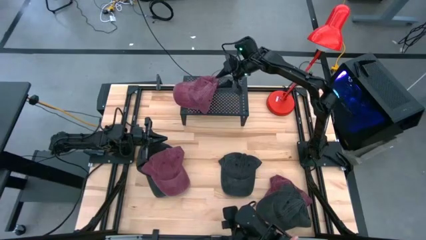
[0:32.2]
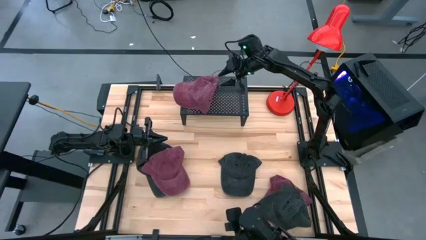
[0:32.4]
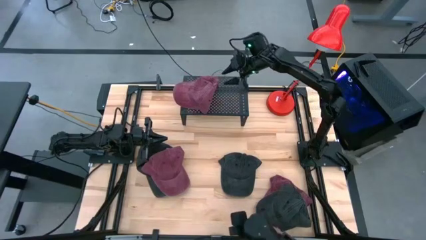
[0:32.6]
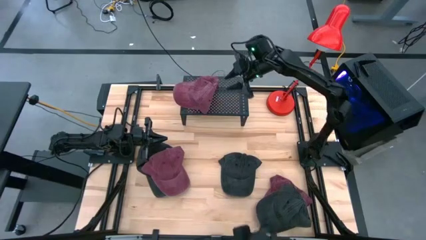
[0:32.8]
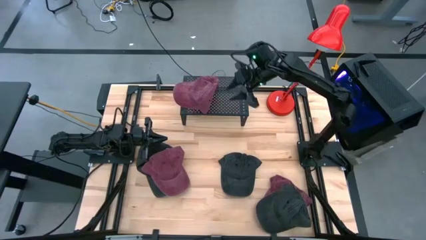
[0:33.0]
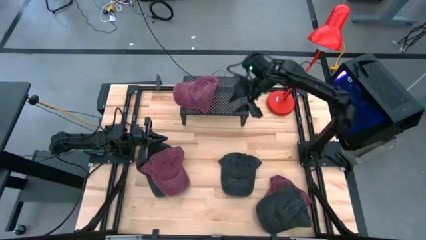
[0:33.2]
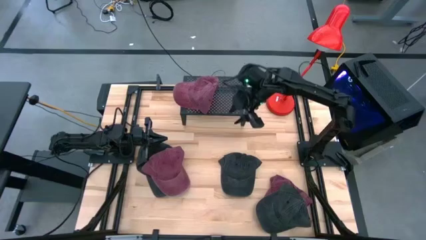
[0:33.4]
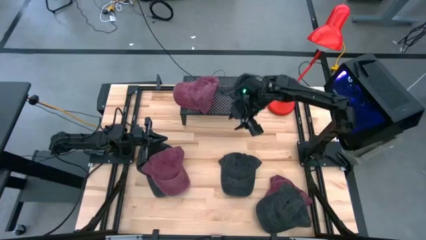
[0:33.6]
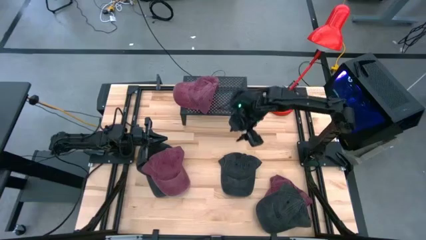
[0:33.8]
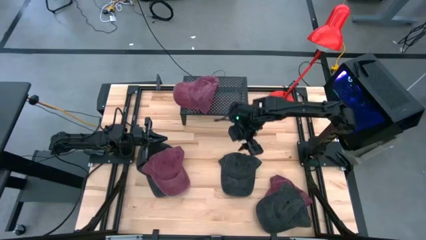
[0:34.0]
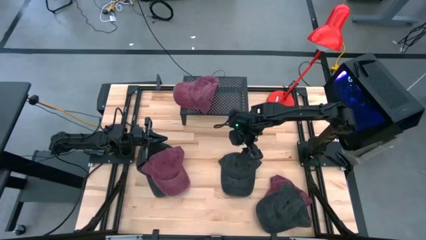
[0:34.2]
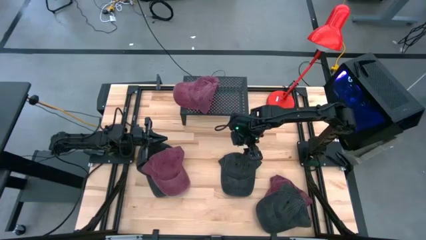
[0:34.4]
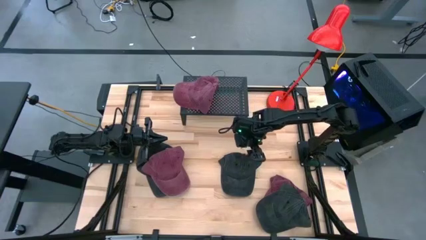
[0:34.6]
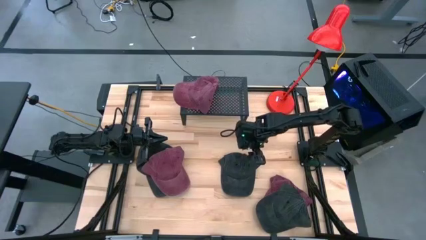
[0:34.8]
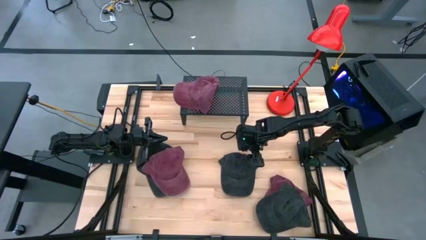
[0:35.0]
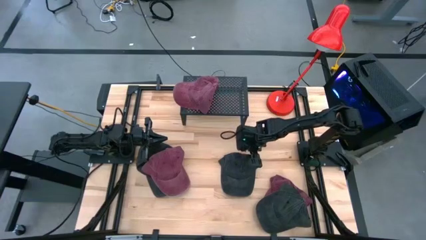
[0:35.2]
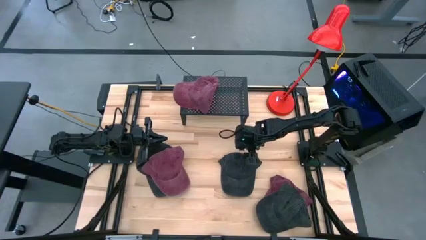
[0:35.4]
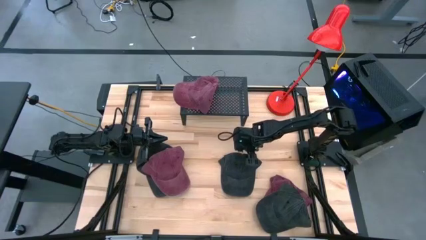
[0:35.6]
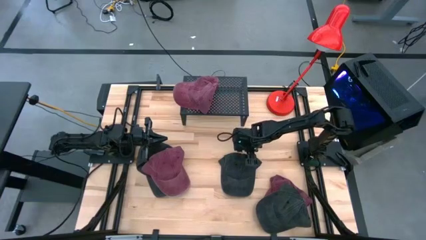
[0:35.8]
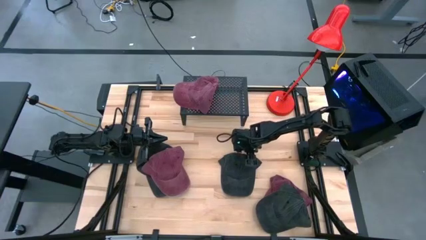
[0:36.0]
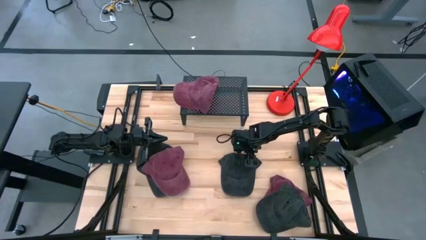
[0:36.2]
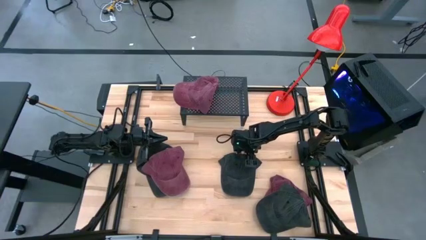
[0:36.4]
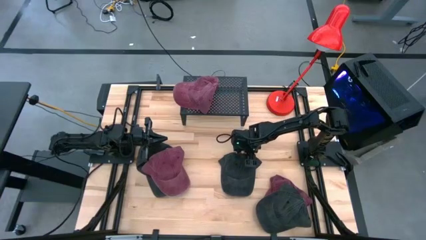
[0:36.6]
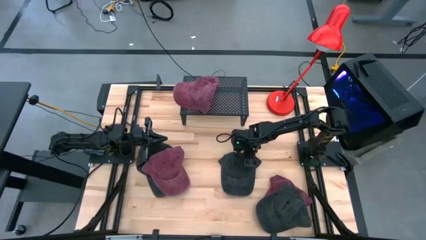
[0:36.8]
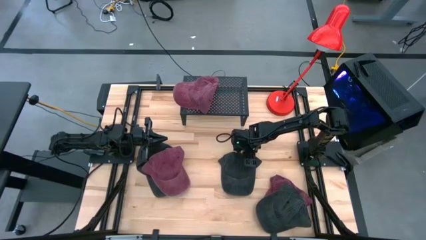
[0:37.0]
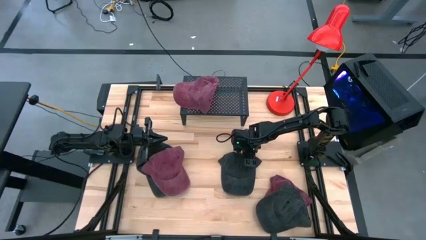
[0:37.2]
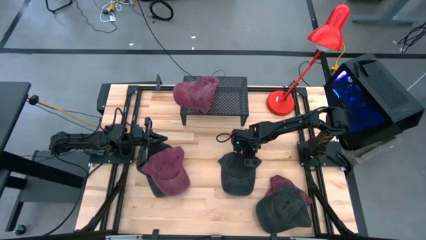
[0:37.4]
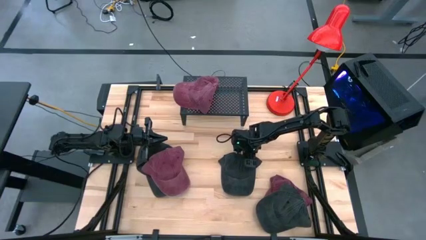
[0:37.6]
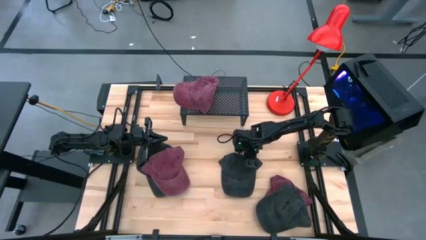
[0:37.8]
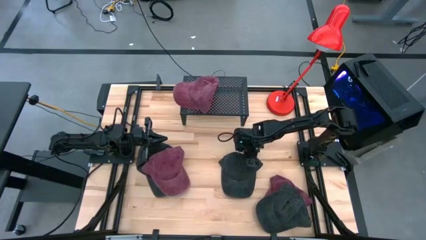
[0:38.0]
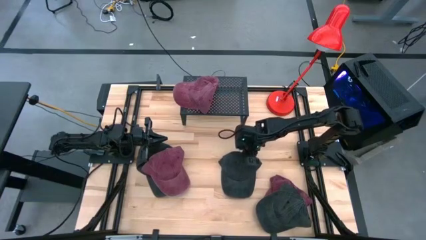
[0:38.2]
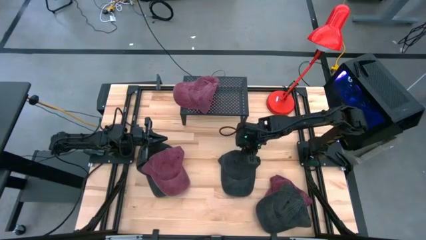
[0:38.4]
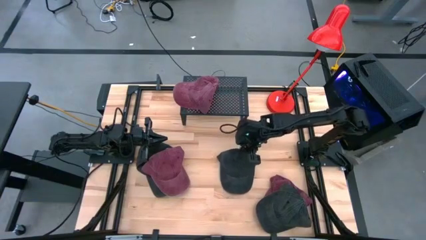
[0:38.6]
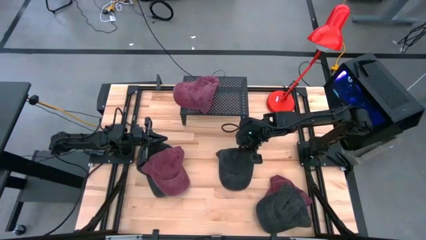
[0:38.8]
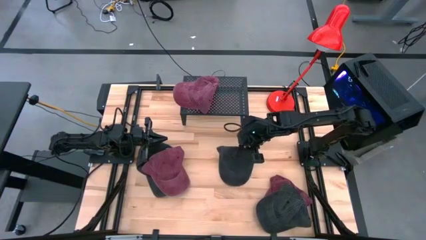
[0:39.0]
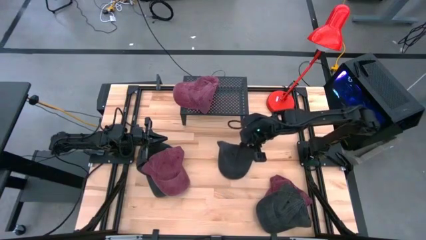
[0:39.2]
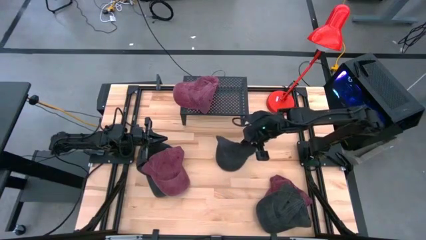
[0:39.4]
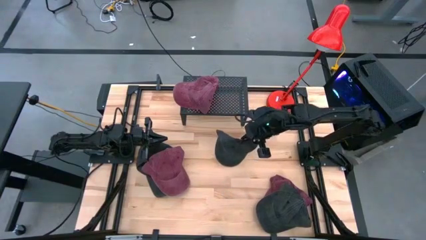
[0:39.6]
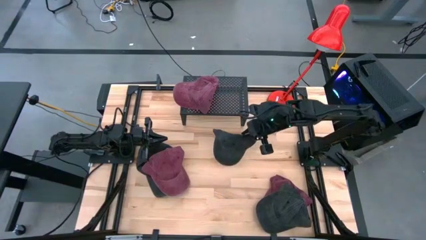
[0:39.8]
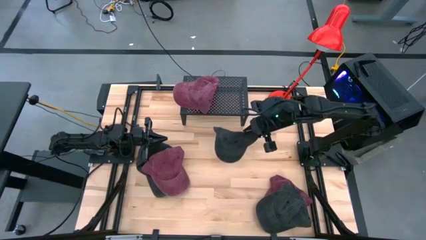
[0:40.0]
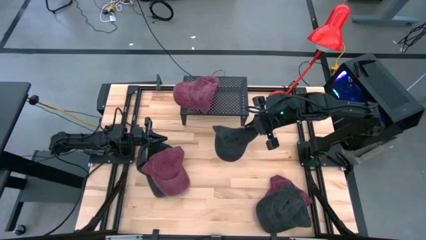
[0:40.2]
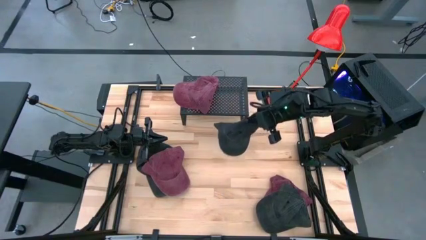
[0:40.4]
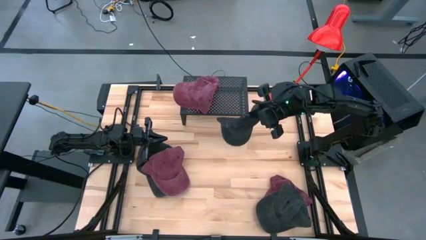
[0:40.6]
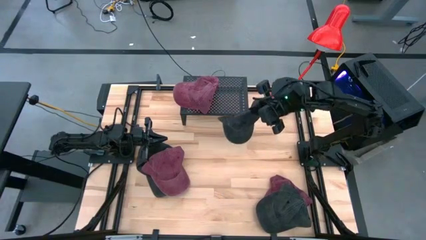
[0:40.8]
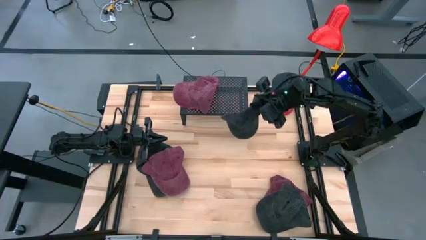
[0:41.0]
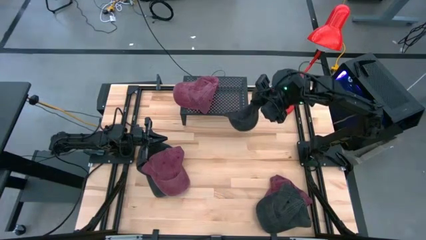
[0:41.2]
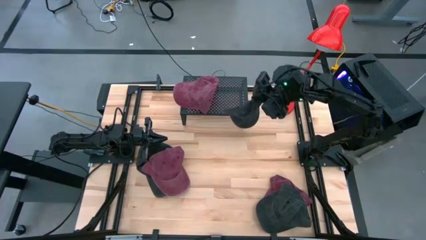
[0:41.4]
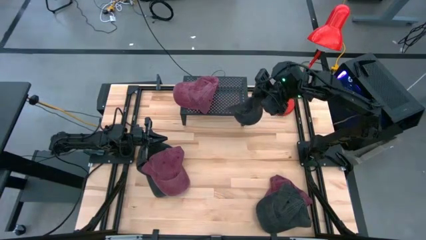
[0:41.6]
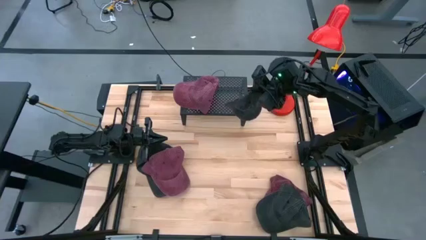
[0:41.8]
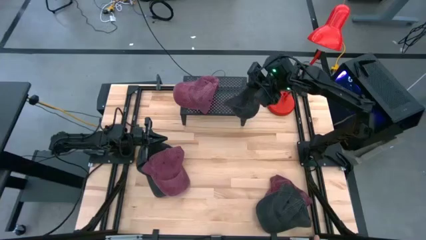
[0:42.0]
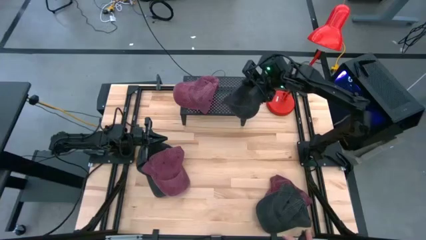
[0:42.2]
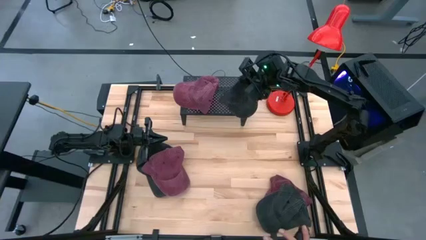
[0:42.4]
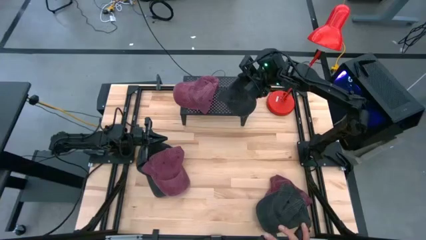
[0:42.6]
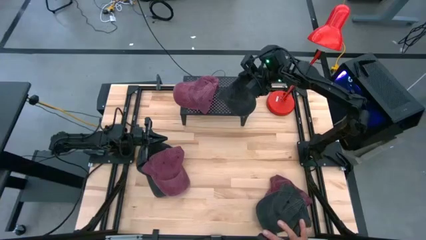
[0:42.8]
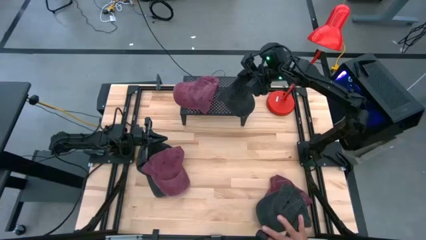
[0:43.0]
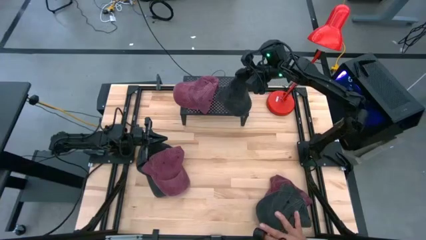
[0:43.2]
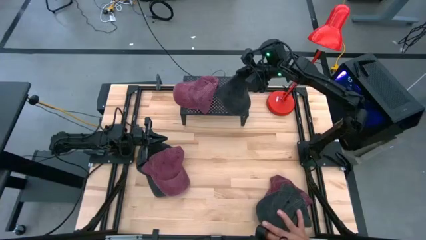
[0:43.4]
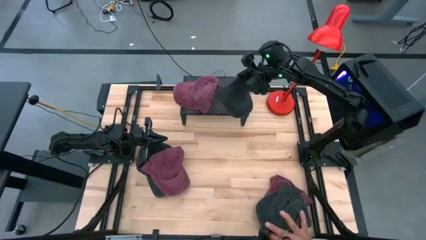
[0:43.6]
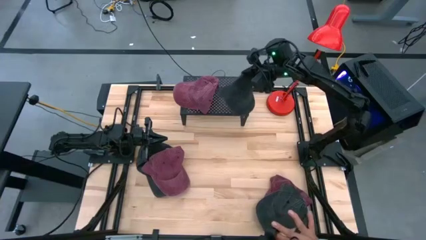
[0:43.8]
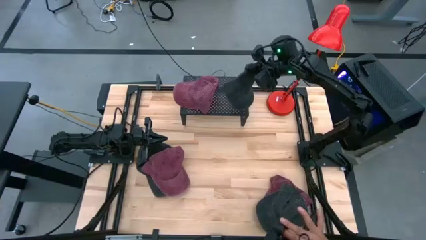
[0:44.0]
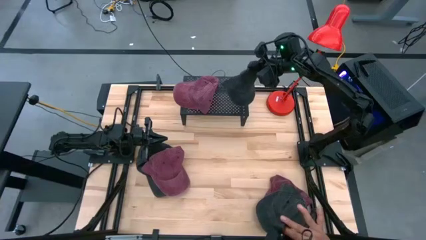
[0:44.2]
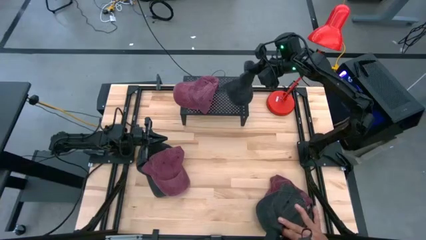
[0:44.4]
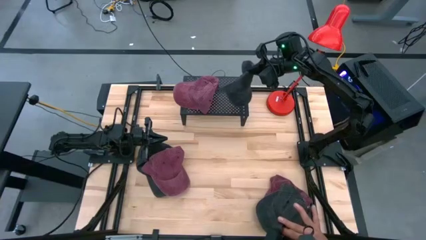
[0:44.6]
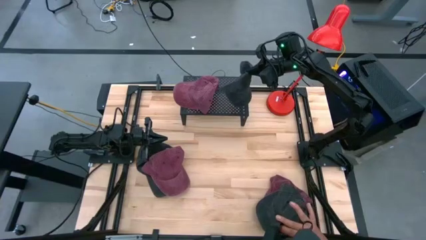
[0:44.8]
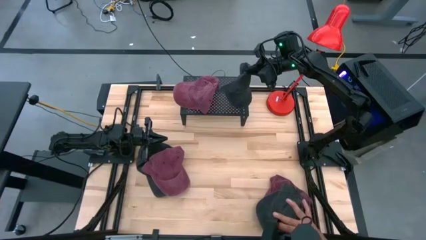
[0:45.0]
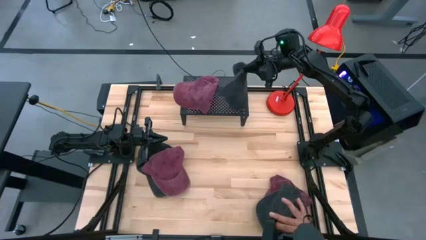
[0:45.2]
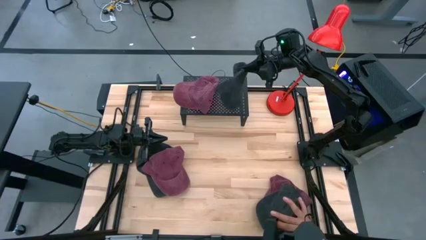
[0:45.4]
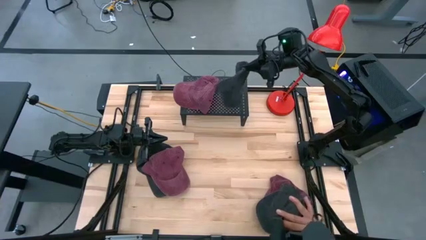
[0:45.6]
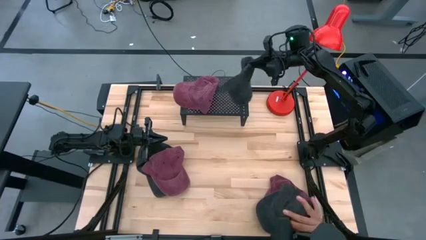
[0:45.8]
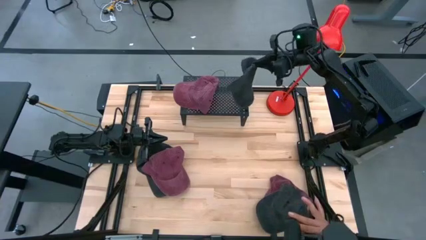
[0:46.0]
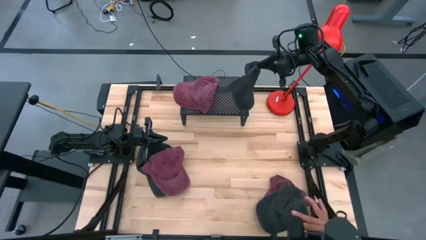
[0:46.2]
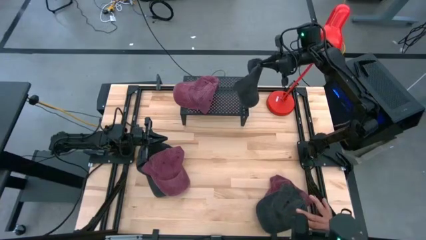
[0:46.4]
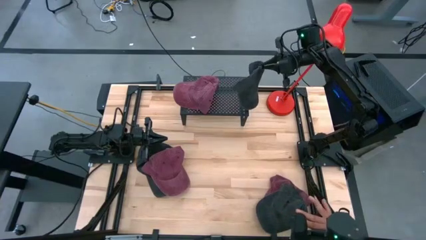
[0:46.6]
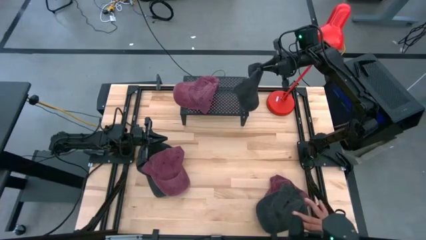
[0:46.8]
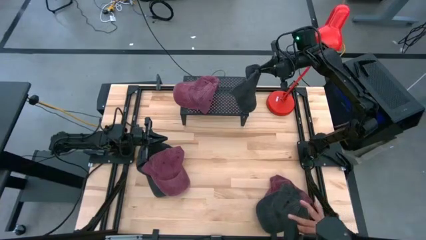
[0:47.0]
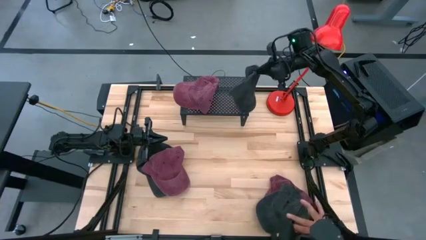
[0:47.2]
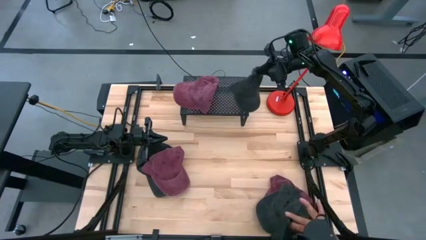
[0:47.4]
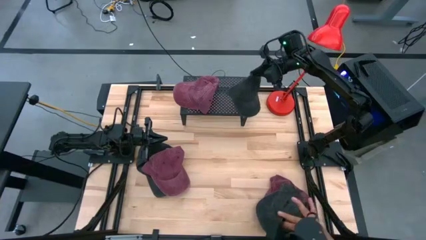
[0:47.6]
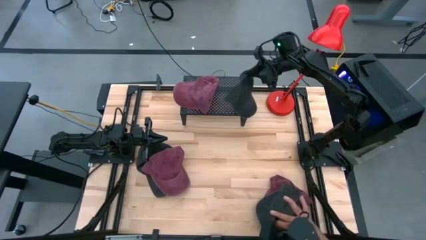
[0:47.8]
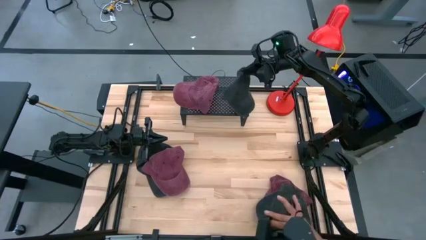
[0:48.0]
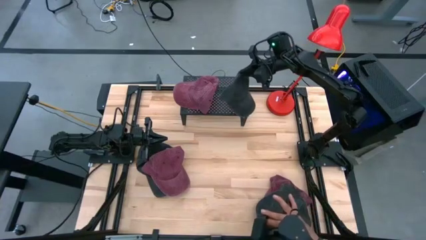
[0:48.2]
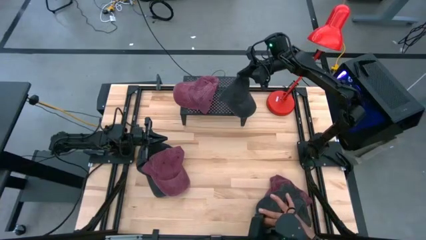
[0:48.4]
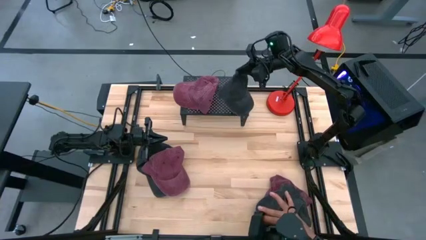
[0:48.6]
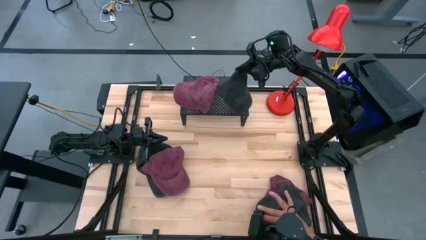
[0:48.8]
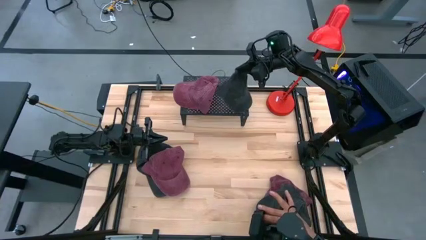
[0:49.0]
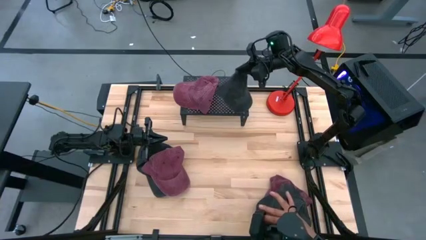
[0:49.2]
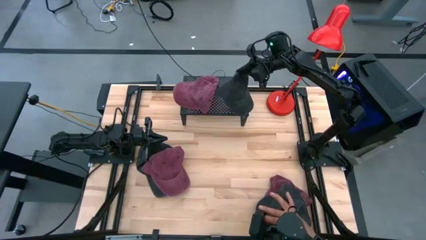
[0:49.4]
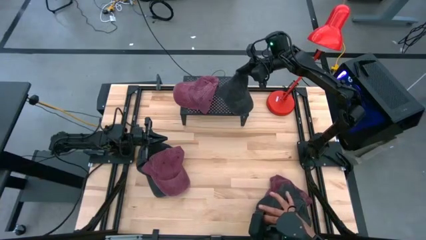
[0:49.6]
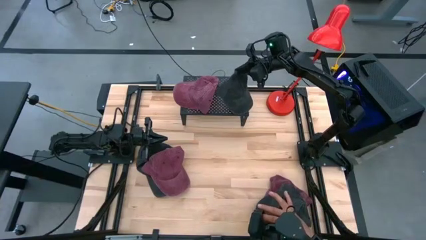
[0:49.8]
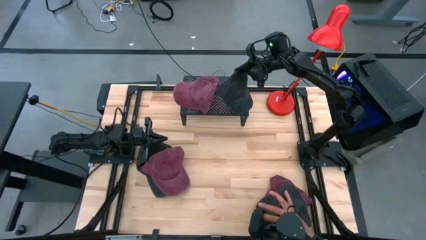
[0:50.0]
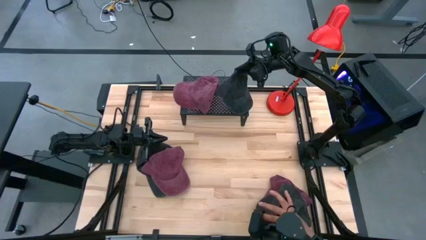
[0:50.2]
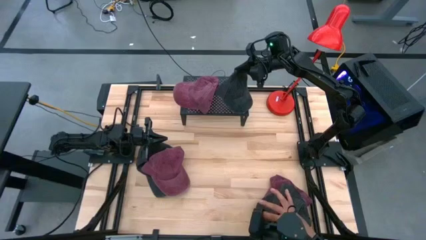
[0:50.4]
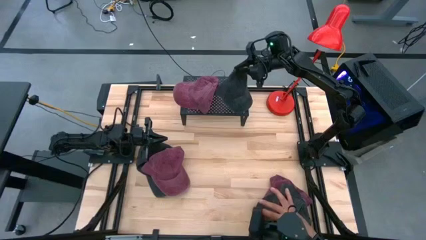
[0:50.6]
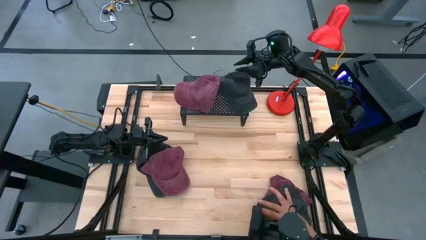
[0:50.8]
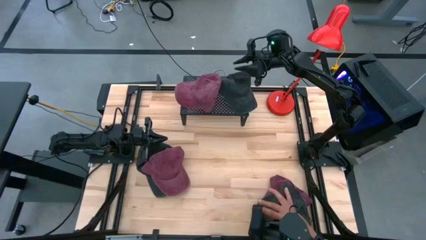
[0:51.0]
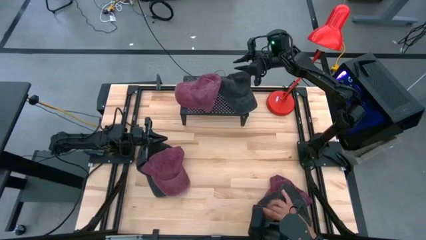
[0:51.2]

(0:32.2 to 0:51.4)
Task: Pick & Place hat
Put the middle black cap on the shelf
